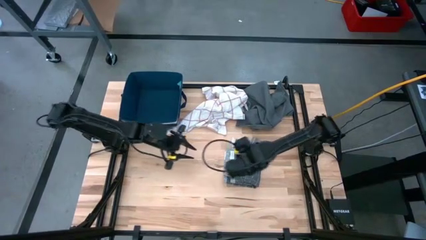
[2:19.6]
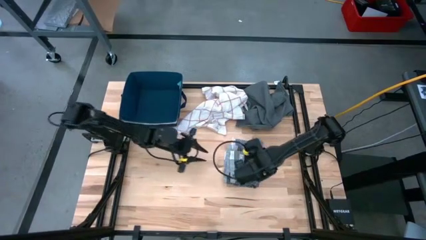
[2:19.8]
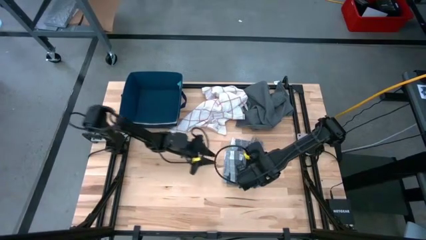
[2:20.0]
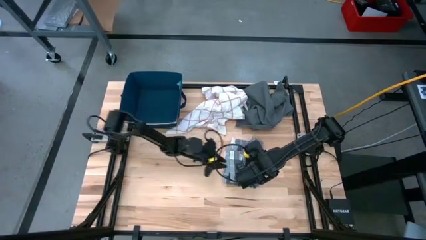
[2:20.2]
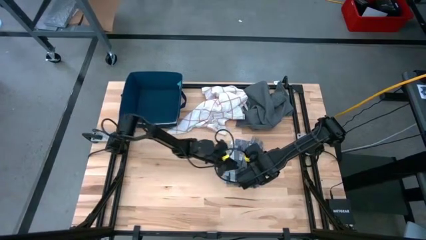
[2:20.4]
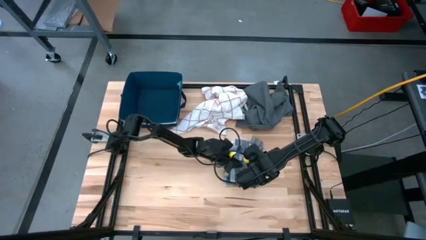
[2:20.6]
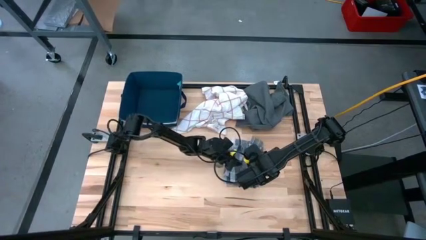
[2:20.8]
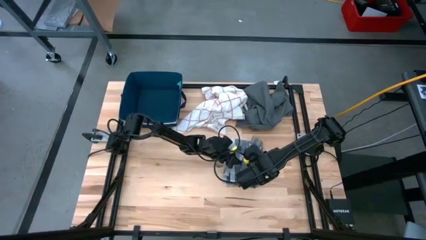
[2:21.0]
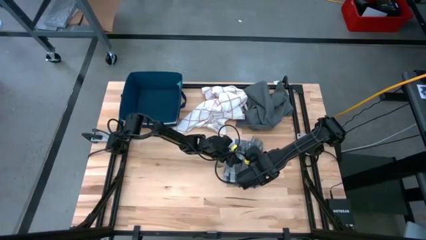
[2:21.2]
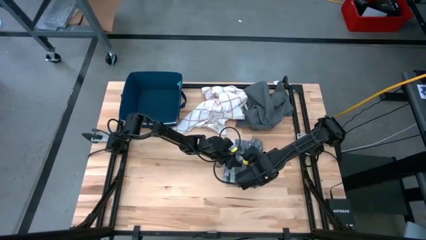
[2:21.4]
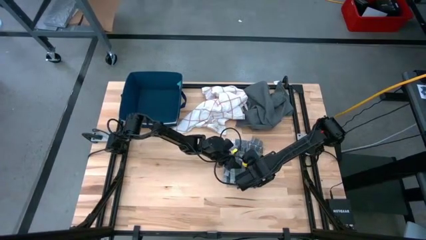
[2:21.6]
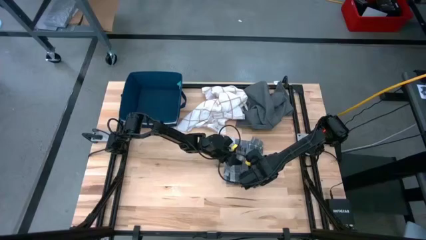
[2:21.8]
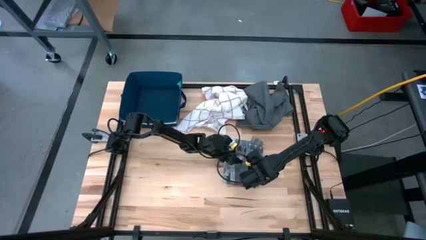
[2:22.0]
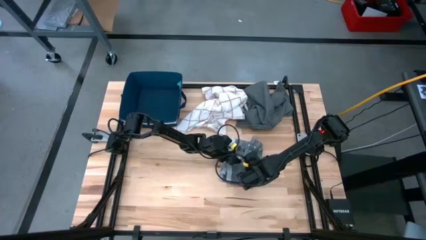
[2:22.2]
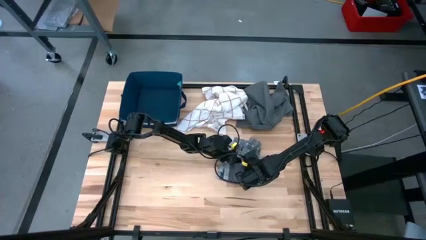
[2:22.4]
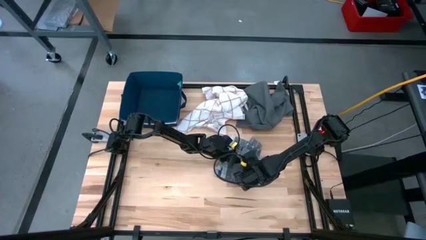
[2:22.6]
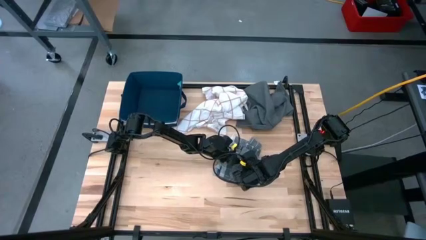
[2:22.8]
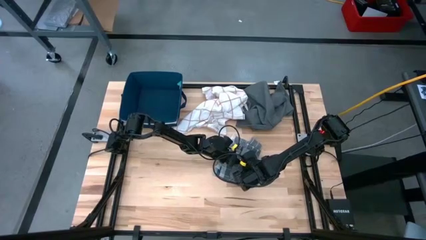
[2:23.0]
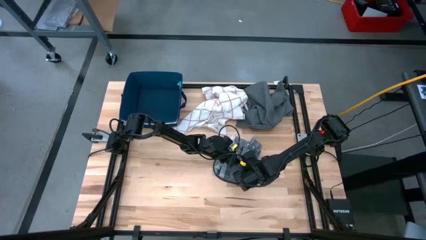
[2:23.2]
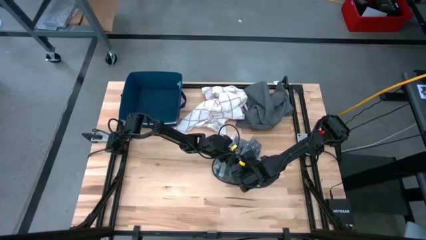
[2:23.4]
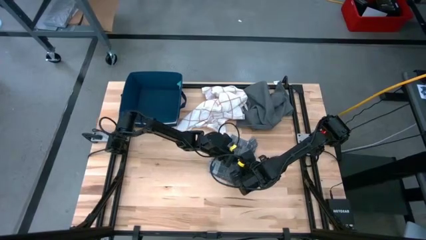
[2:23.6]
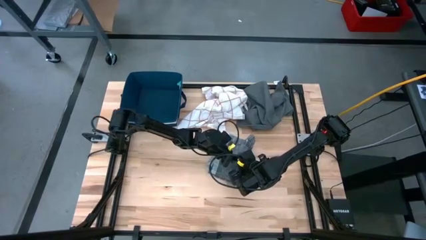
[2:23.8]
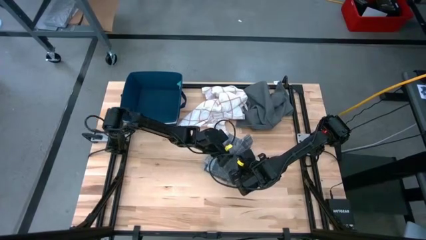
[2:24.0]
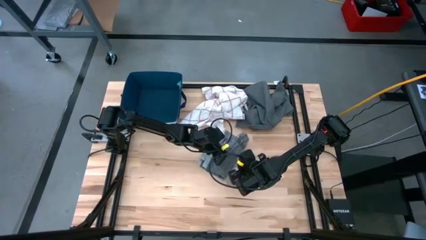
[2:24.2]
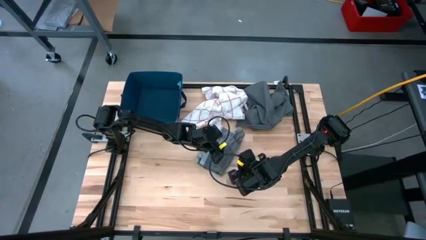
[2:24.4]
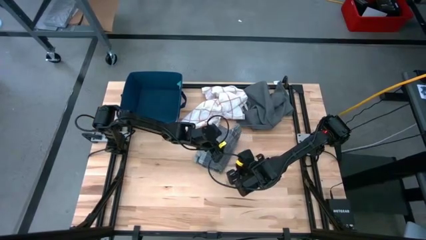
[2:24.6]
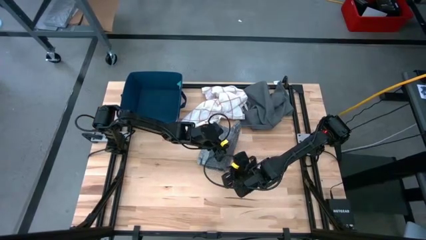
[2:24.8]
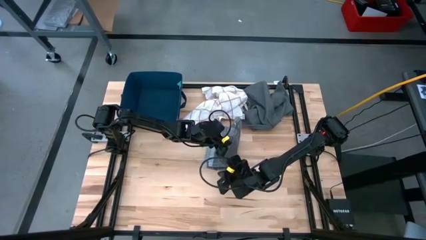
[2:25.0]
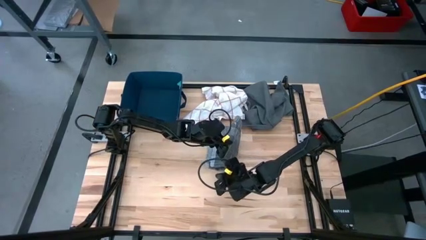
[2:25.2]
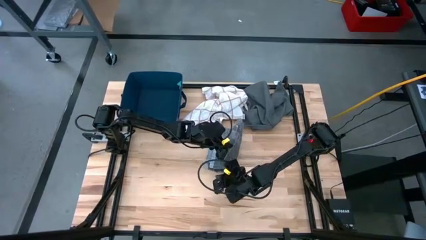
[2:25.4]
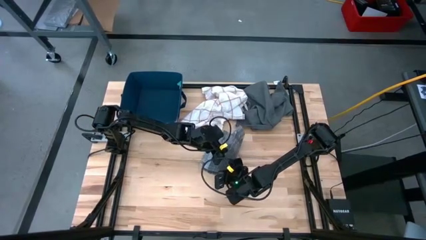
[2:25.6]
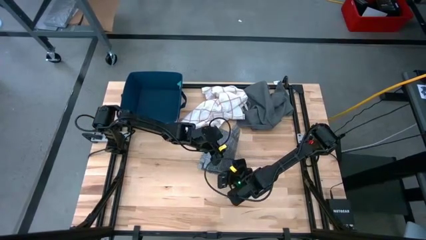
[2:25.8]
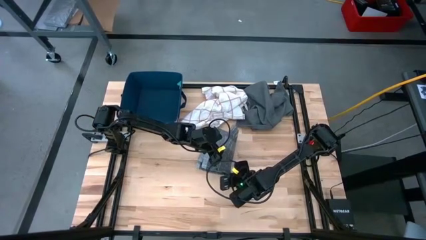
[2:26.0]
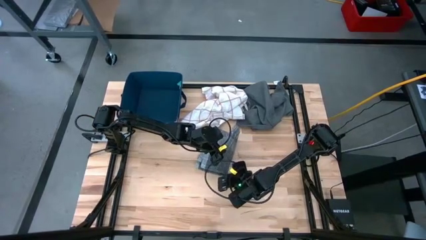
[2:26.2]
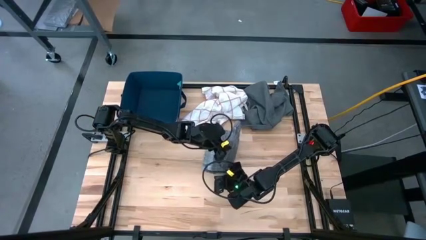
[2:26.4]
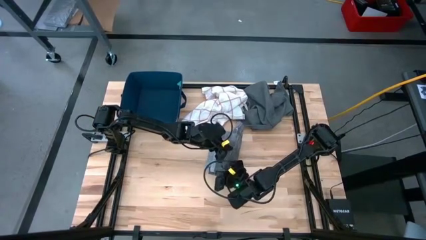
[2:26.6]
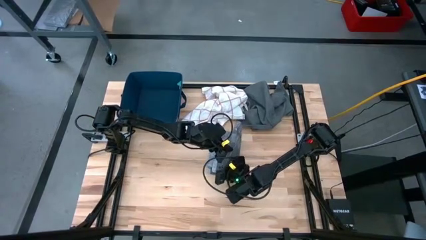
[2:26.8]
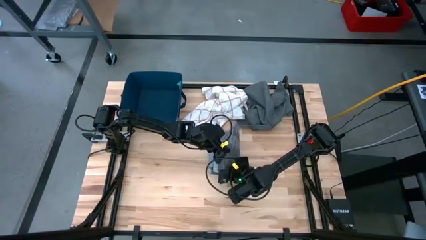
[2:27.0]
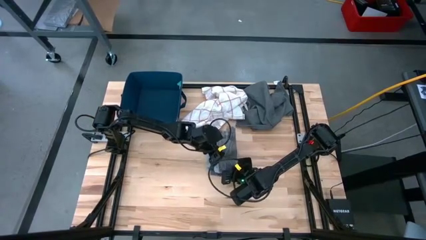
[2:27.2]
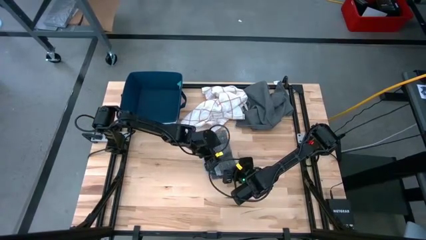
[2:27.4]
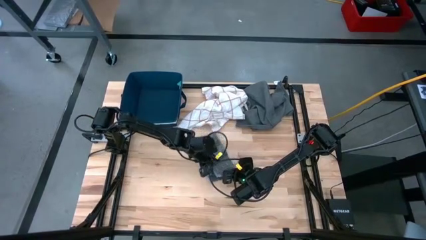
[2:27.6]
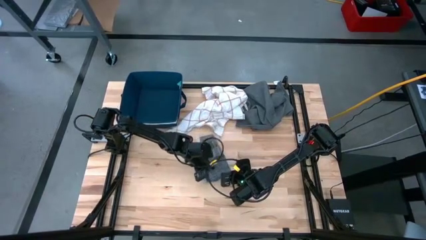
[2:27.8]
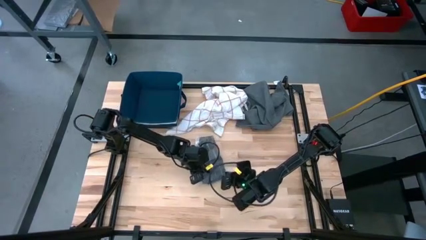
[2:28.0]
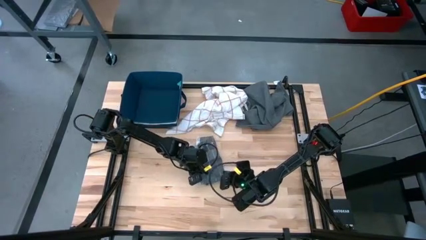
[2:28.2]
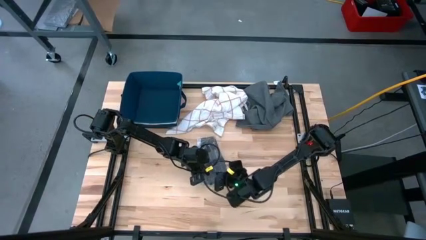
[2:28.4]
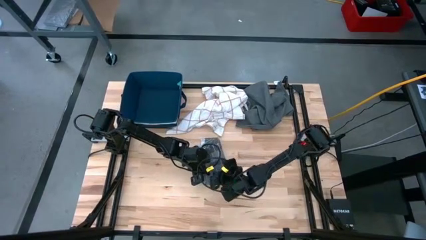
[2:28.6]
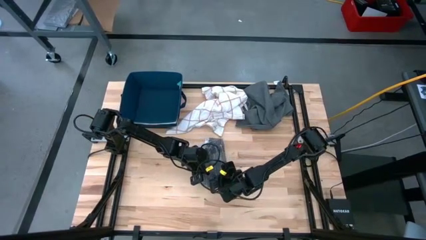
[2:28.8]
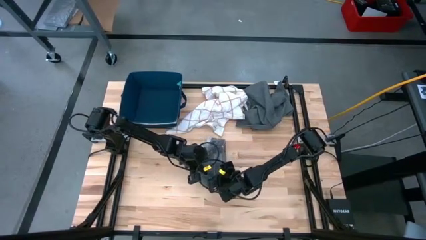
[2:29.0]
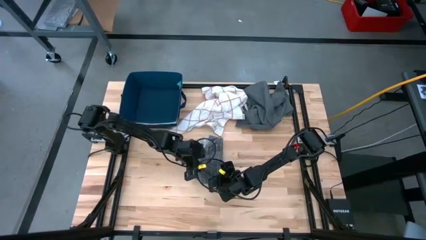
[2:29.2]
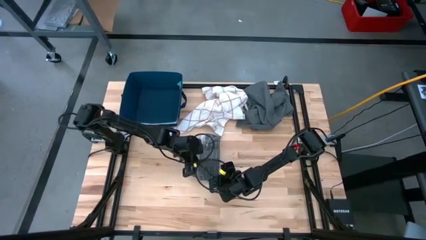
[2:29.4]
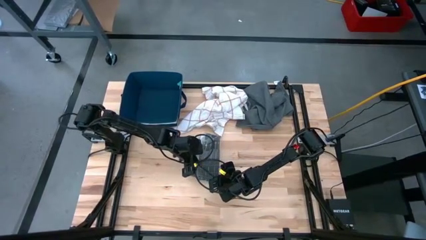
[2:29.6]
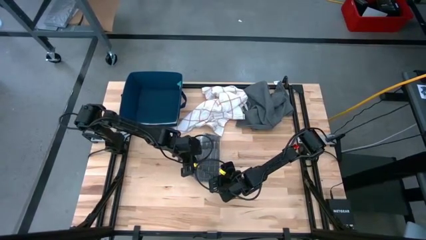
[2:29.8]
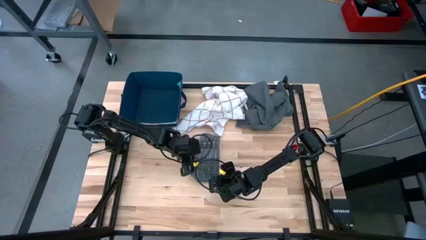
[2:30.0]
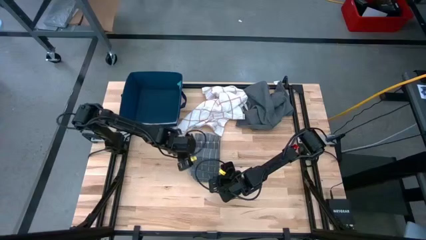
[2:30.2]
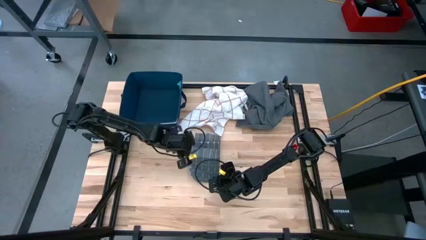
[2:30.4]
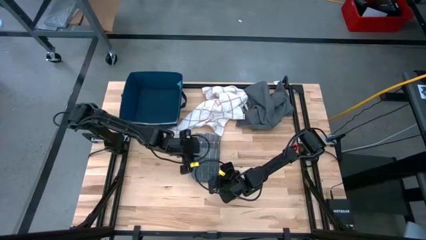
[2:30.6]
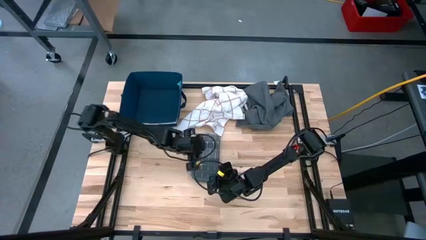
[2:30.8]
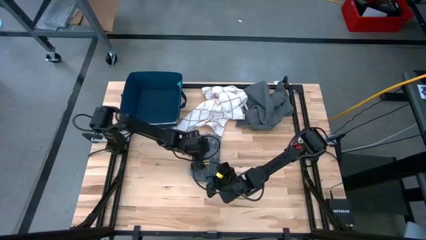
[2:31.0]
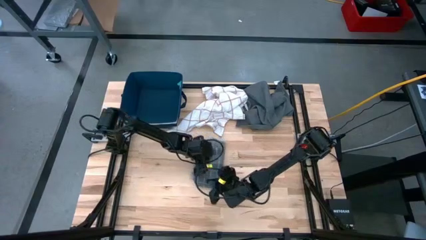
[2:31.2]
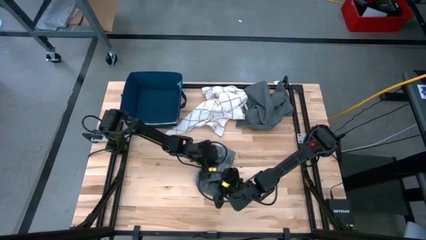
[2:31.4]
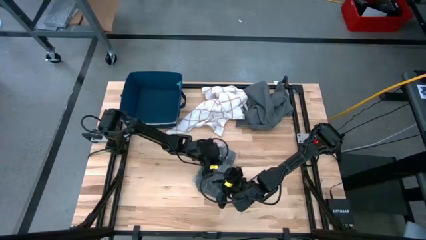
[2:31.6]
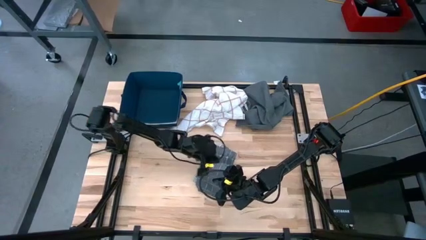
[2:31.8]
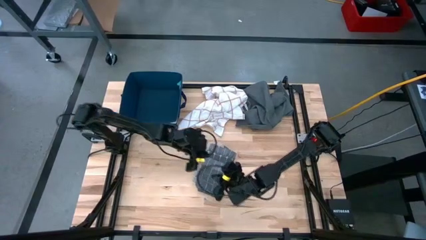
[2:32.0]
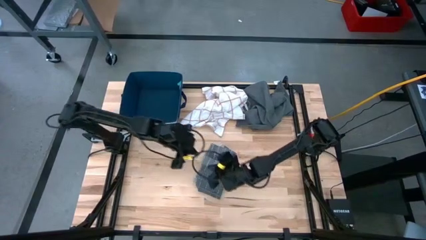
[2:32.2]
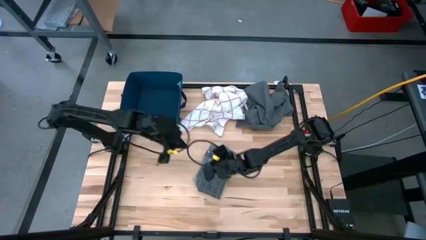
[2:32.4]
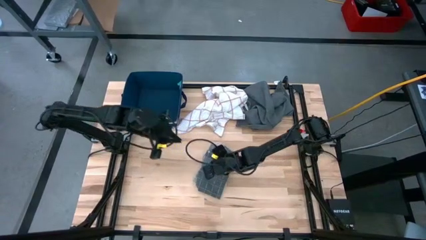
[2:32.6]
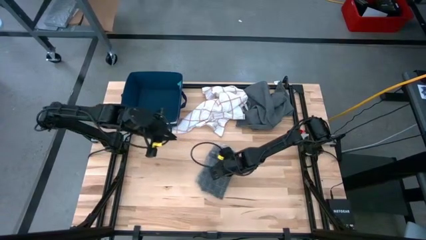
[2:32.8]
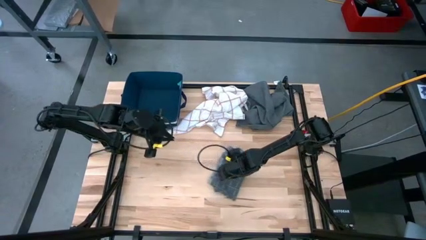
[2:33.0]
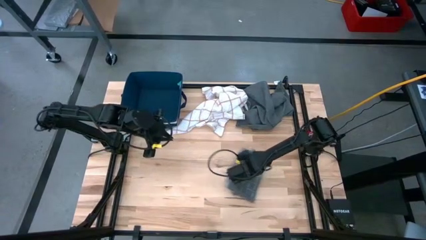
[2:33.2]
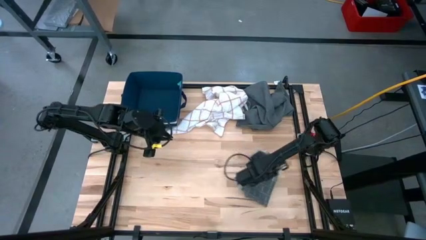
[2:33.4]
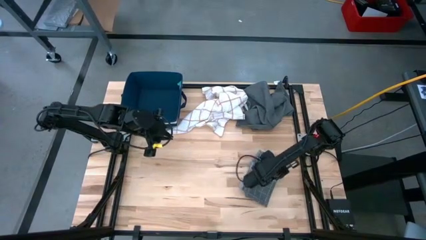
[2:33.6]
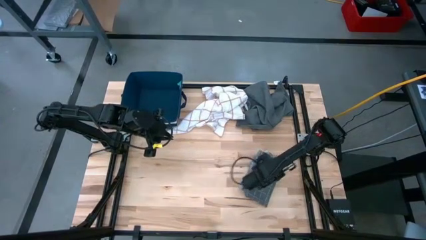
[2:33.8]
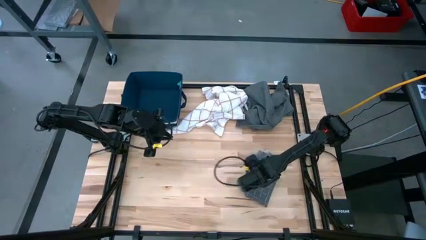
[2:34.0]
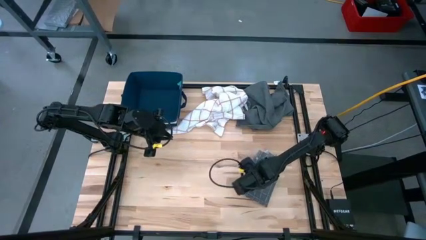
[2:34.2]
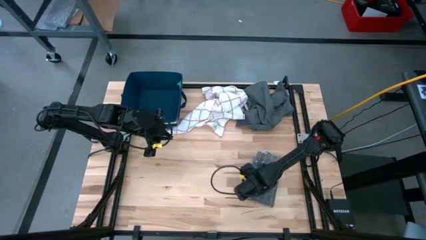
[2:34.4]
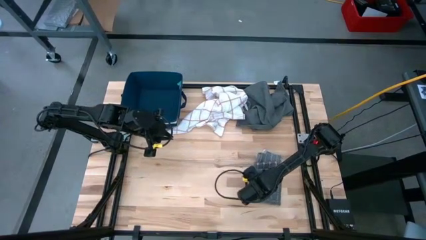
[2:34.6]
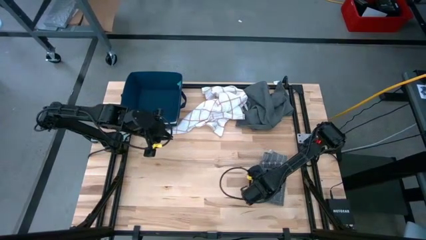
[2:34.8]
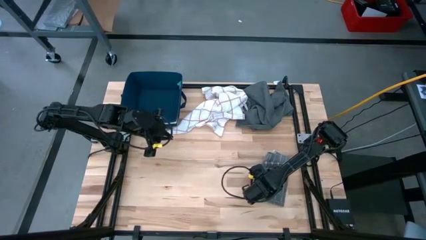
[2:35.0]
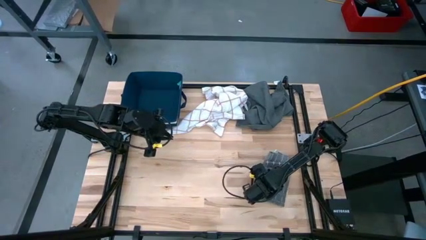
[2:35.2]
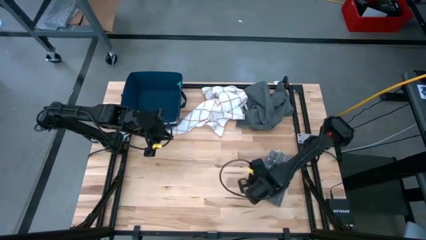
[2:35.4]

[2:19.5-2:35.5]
Task: Fold towel
Fold the gray patterned towel
